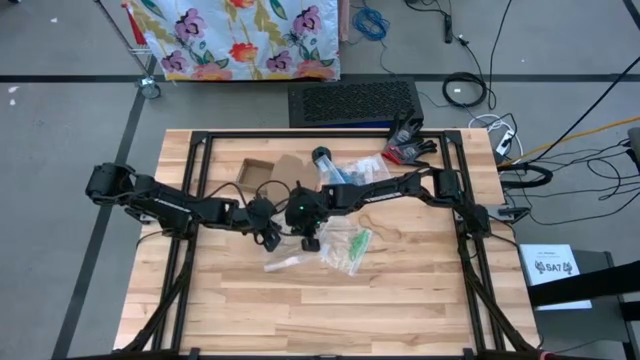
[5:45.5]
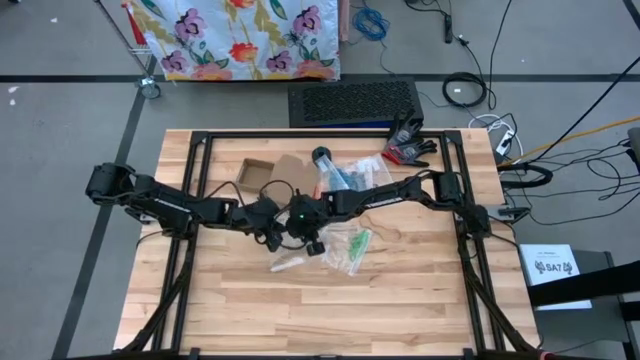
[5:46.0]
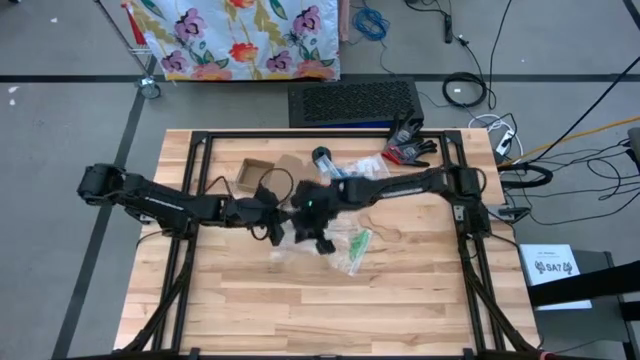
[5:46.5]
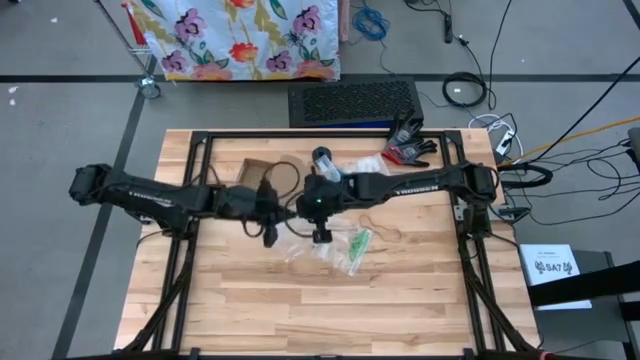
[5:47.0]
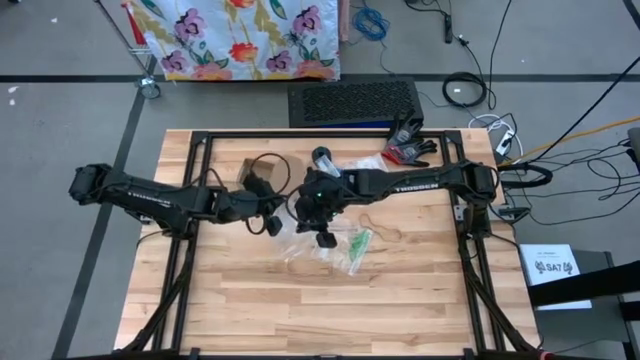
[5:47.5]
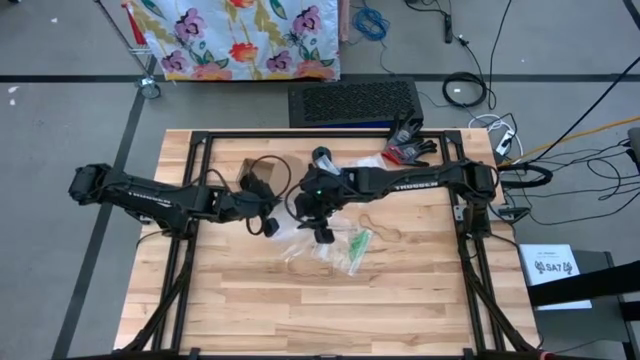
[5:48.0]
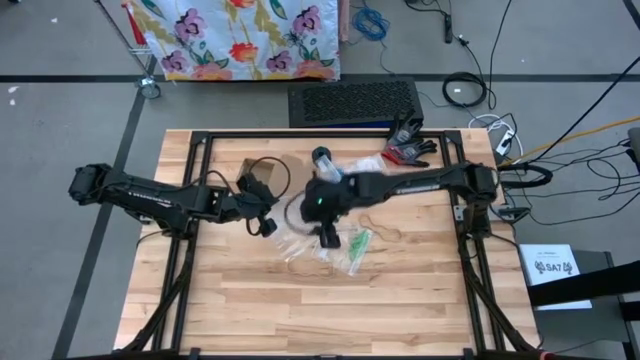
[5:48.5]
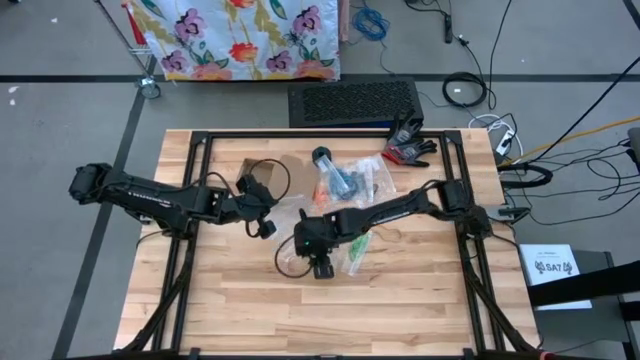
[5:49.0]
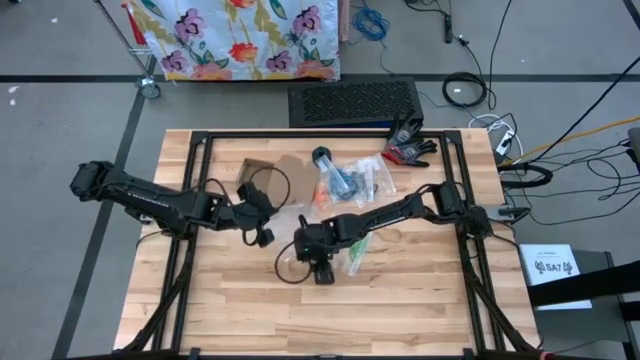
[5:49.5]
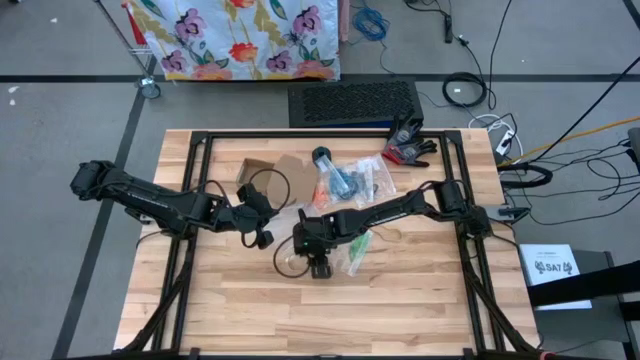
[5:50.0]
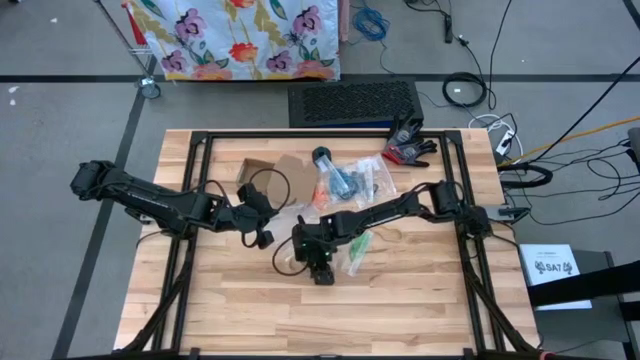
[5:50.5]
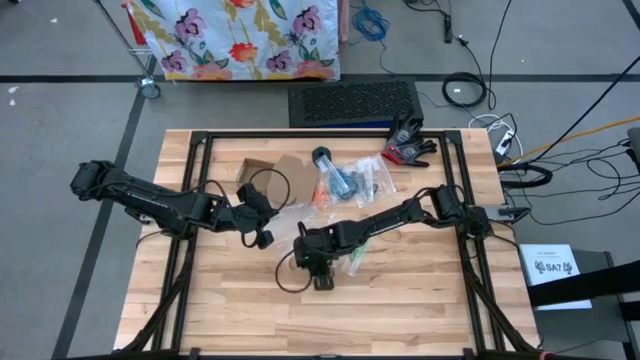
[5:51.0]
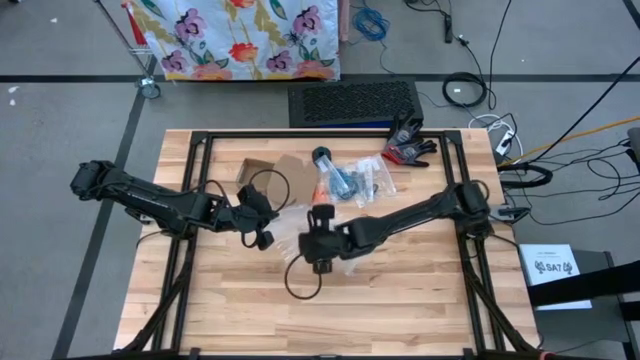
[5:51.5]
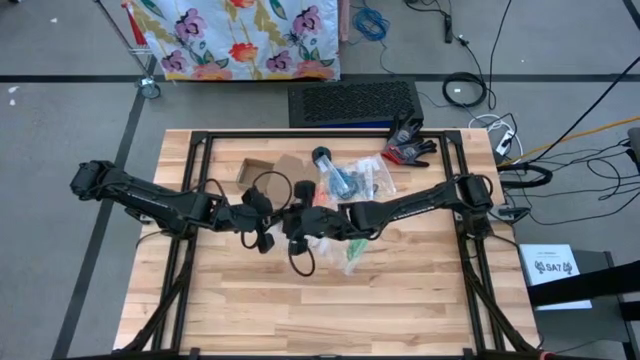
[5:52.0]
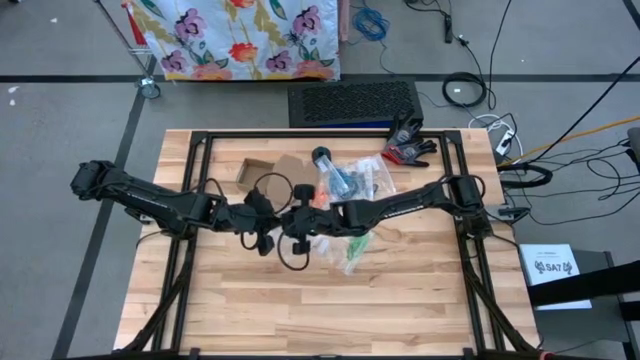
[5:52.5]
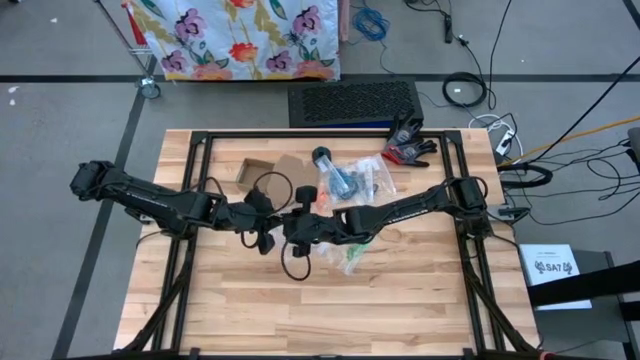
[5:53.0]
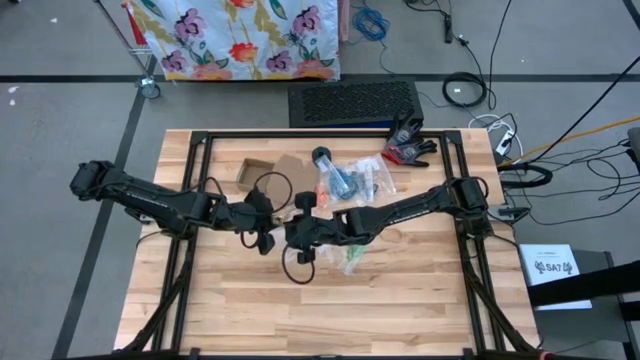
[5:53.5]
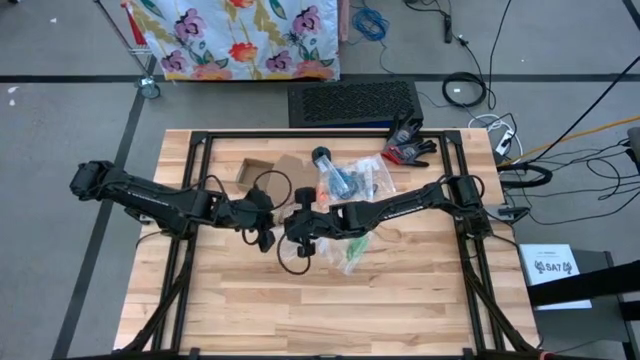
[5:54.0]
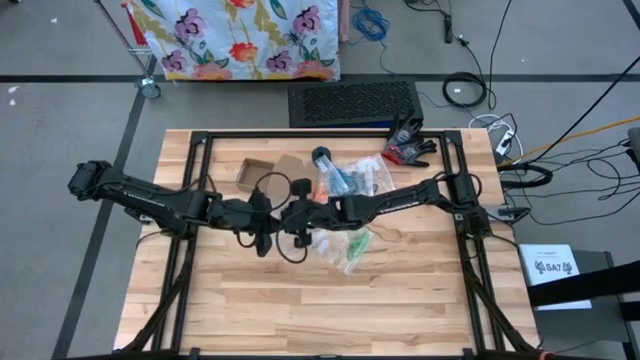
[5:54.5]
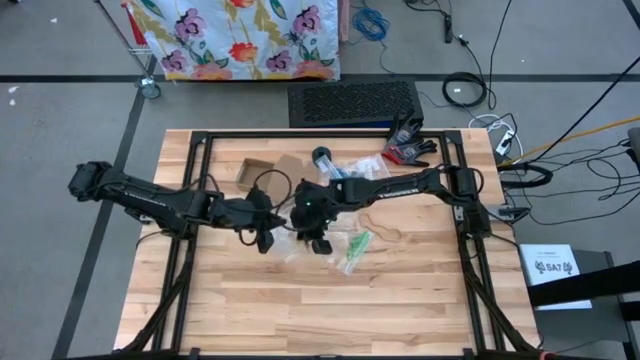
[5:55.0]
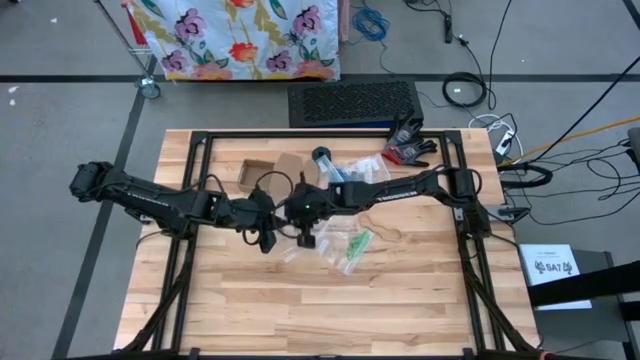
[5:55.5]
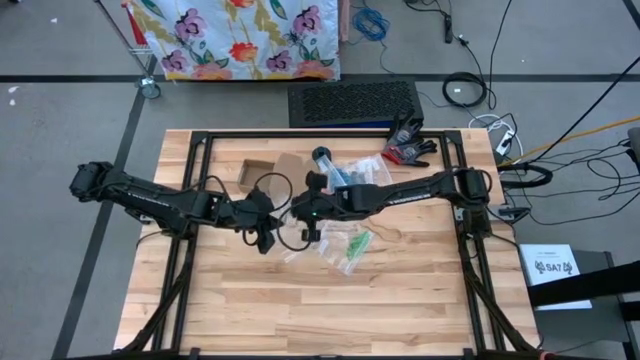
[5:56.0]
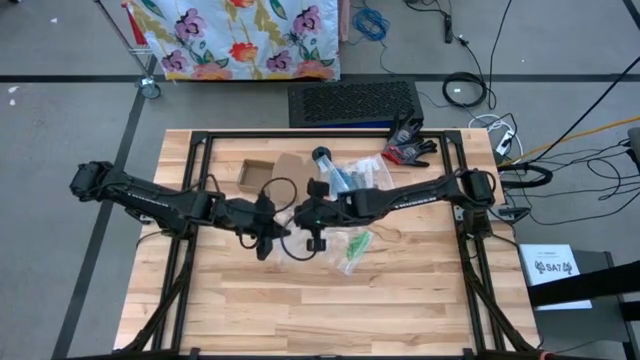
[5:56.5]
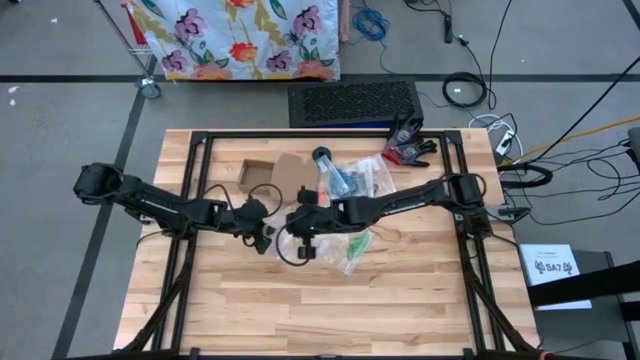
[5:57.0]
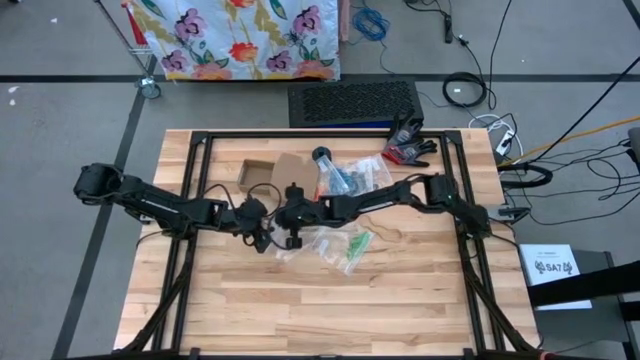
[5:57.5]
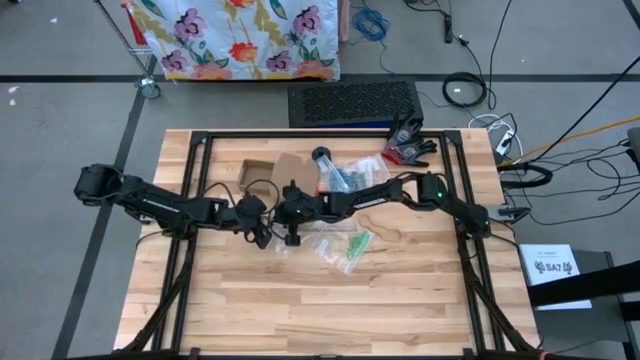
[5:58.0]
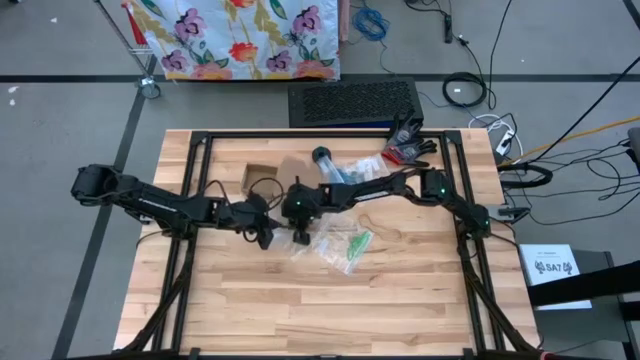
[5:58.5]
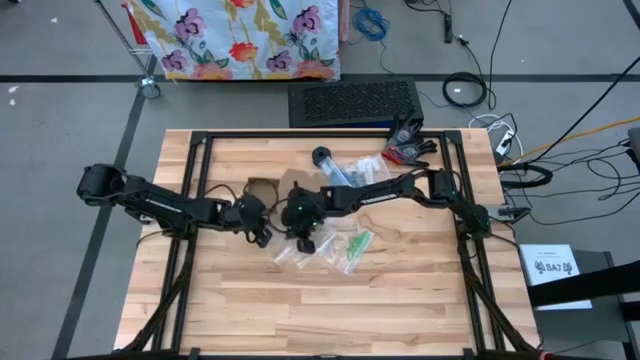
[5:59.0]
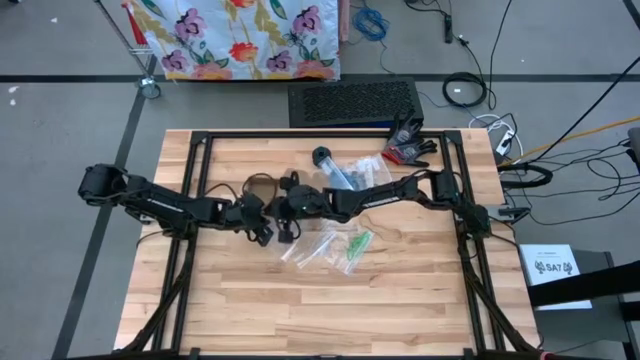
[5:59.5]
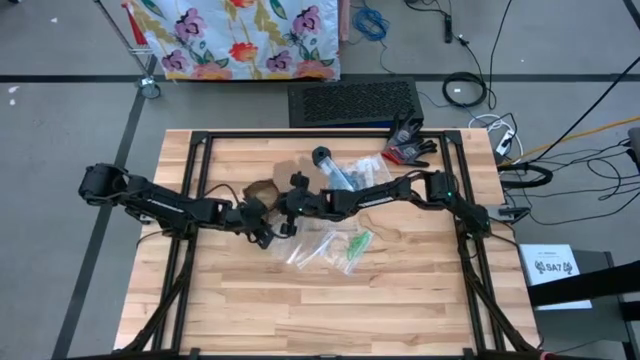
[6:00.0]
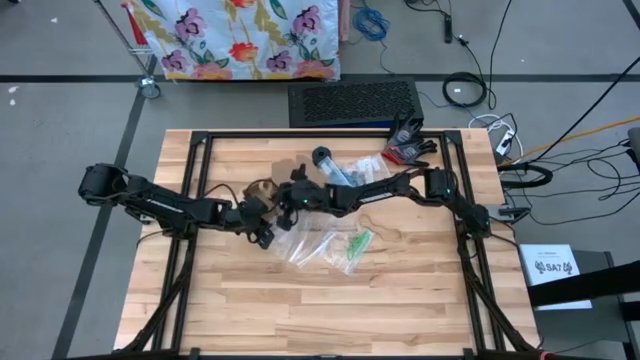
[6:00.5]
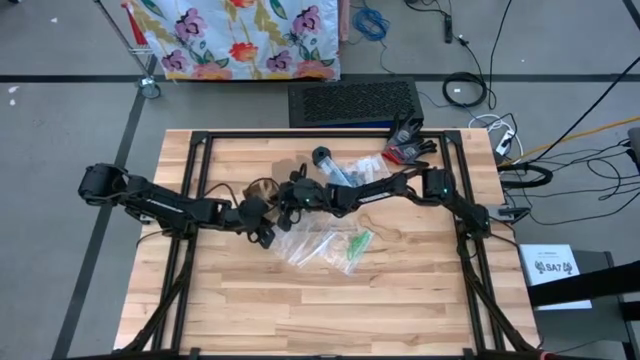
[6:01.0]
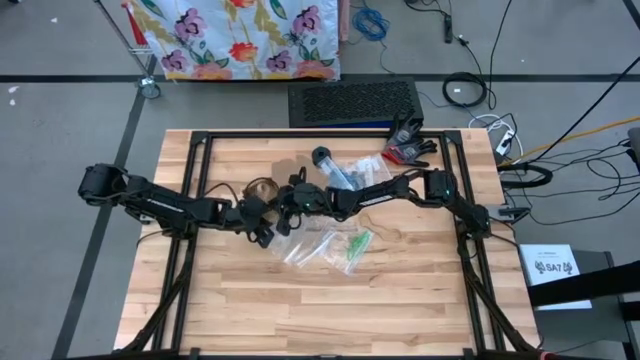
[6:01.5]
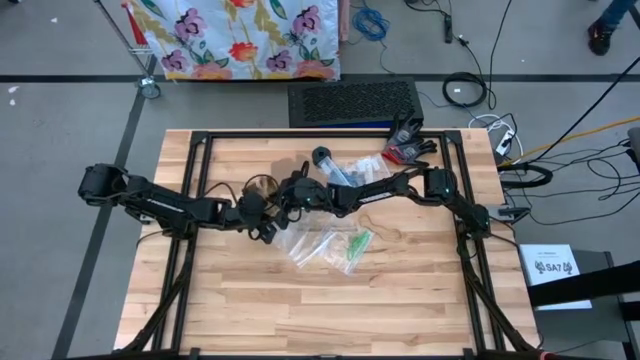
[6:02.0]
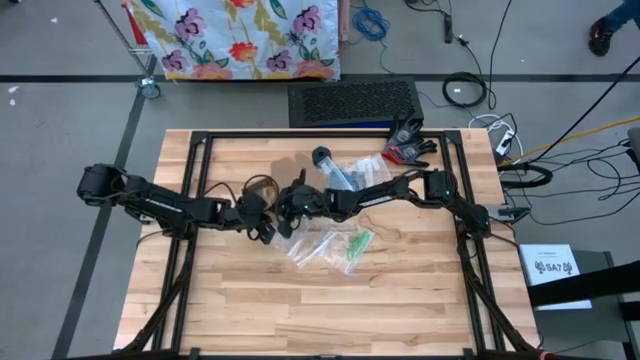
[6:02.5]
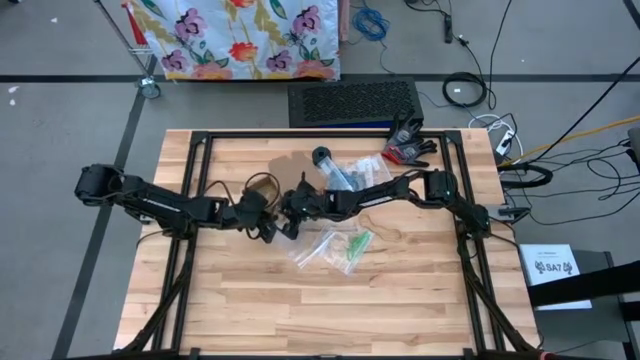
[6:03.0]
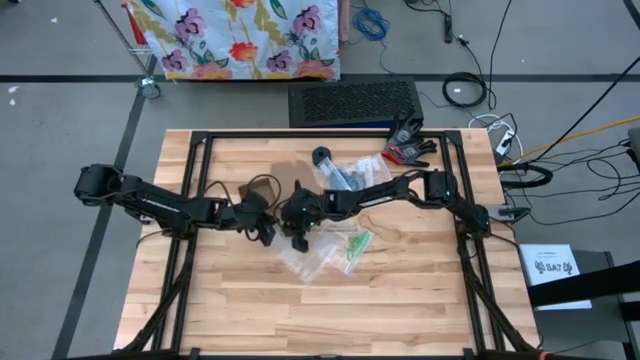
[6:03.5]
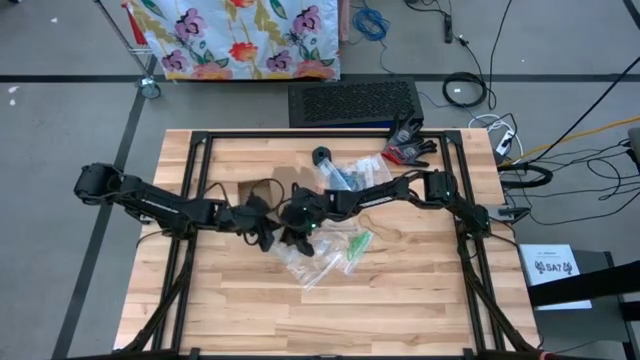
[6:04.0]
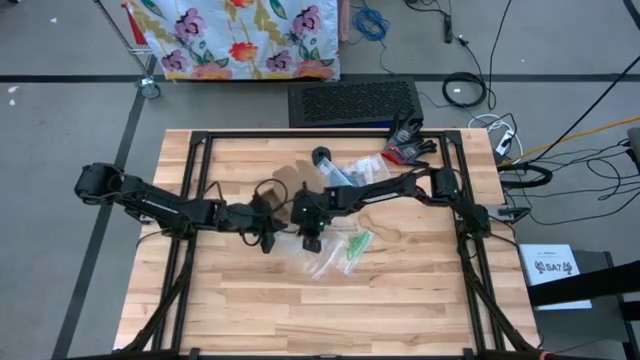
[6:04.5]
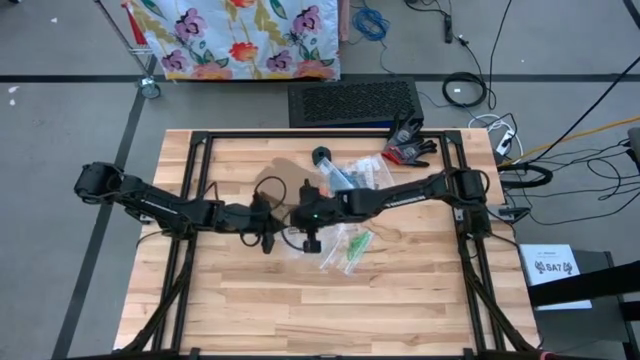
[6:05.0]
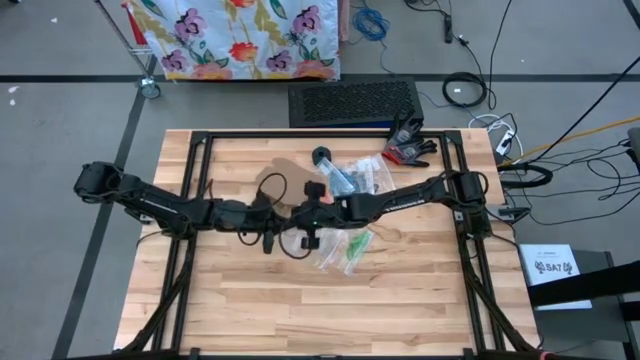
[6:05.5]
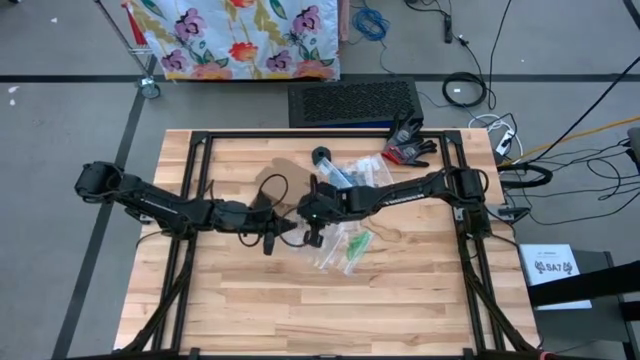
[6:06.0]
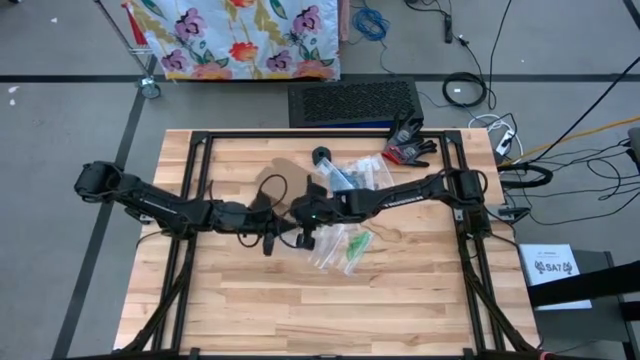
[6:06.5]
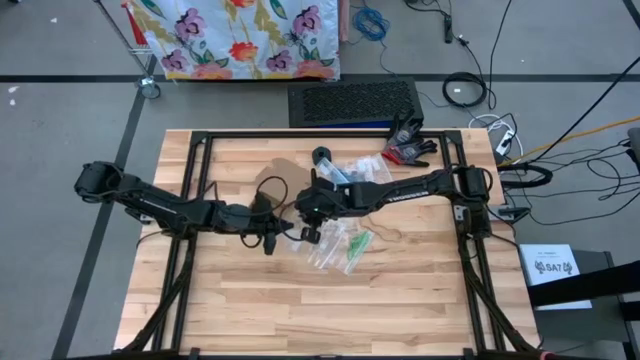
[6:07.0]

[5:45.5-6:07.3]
Task: Sort rubber bands
Put the brown rubber band into the transparent zip bag
